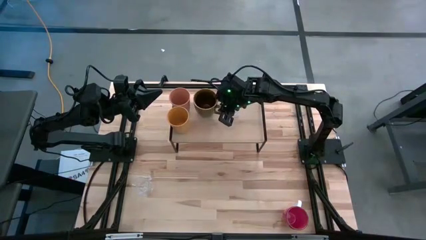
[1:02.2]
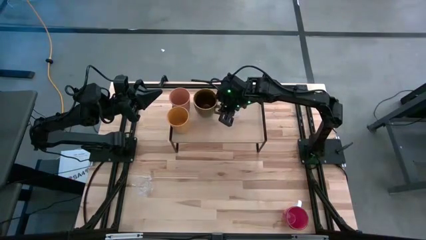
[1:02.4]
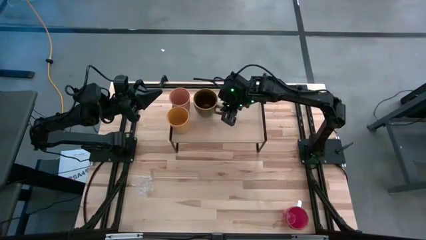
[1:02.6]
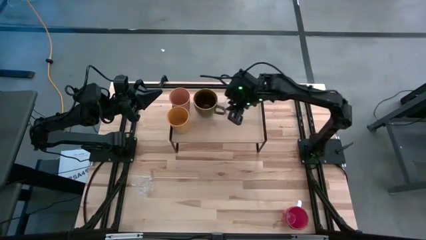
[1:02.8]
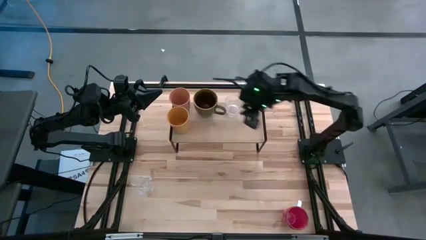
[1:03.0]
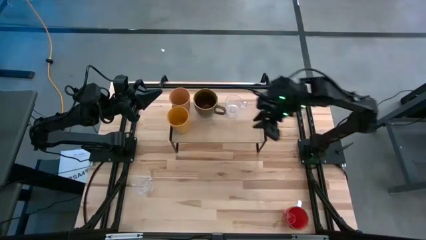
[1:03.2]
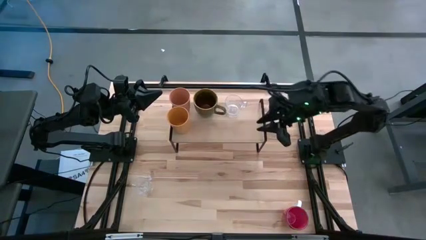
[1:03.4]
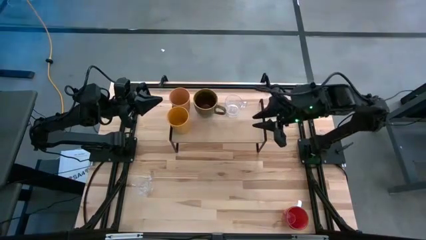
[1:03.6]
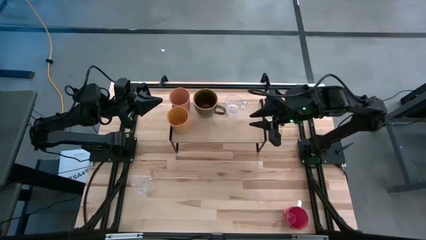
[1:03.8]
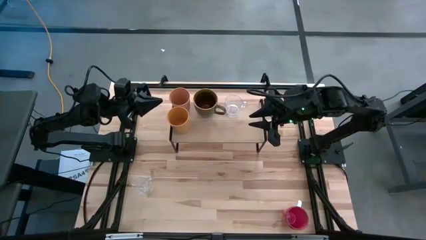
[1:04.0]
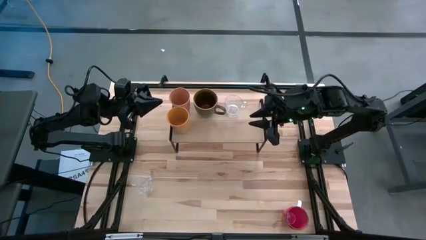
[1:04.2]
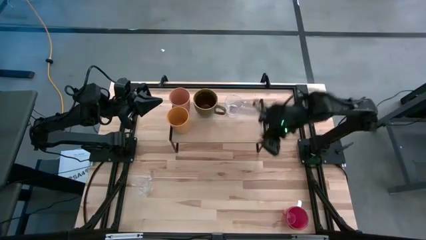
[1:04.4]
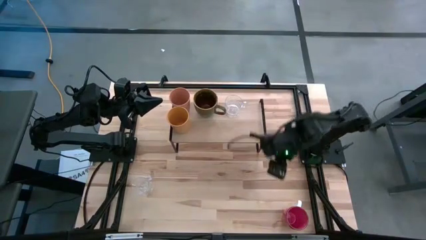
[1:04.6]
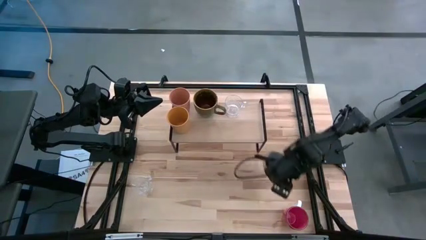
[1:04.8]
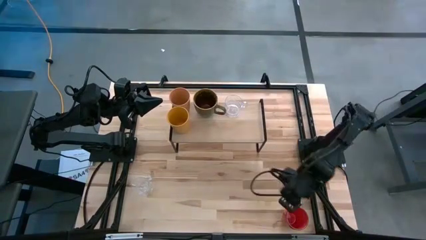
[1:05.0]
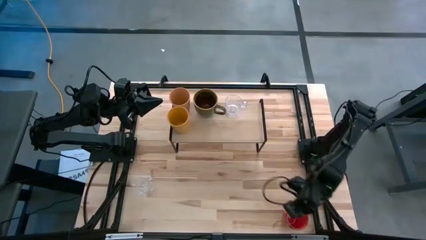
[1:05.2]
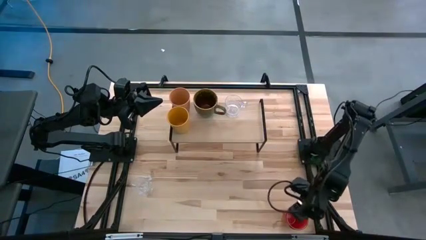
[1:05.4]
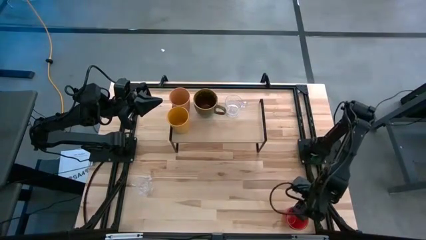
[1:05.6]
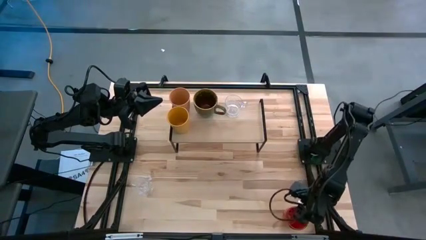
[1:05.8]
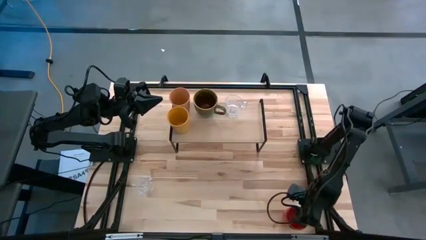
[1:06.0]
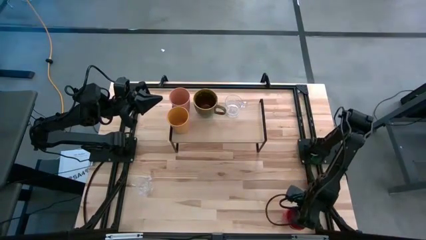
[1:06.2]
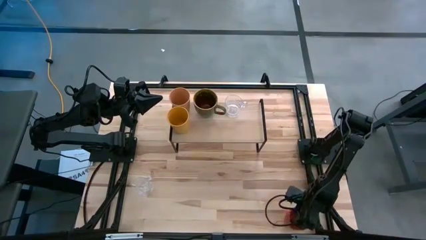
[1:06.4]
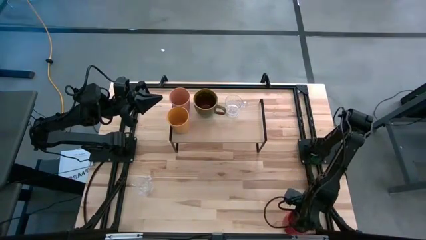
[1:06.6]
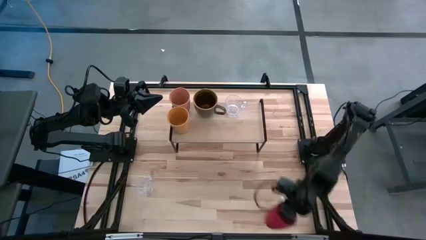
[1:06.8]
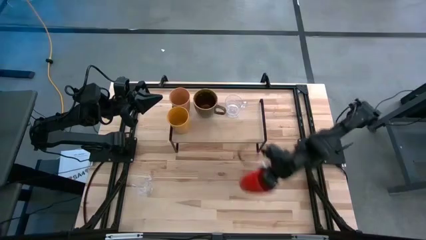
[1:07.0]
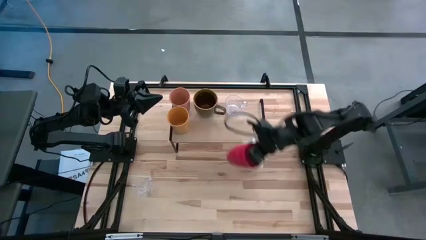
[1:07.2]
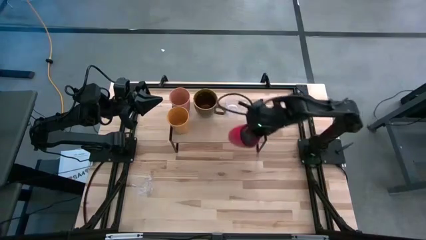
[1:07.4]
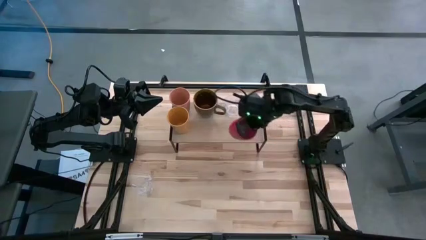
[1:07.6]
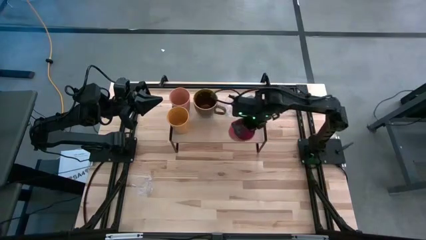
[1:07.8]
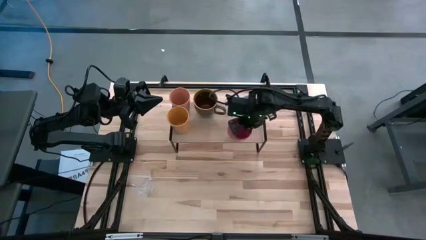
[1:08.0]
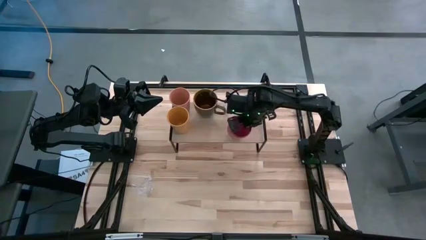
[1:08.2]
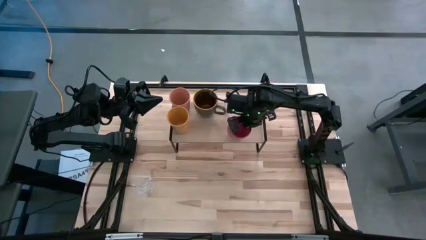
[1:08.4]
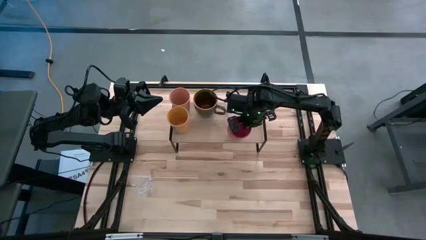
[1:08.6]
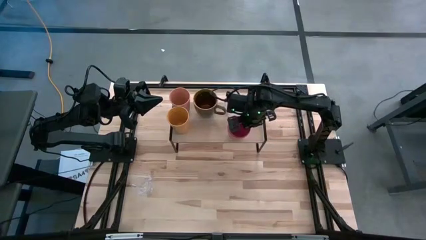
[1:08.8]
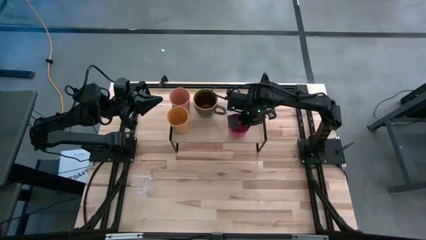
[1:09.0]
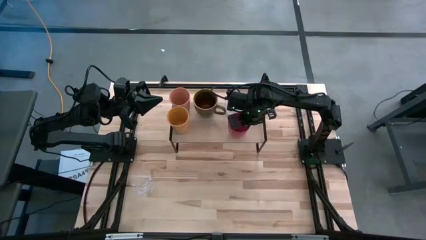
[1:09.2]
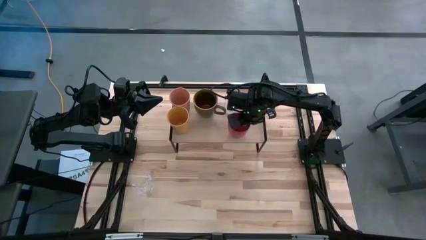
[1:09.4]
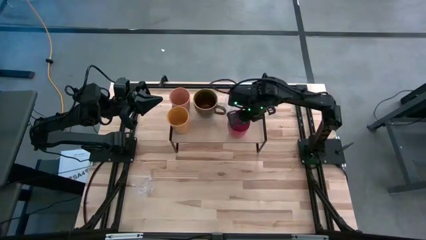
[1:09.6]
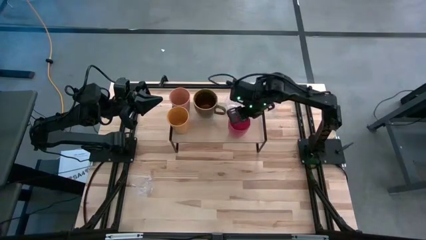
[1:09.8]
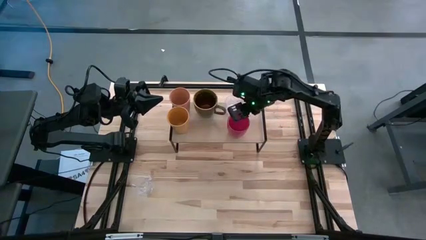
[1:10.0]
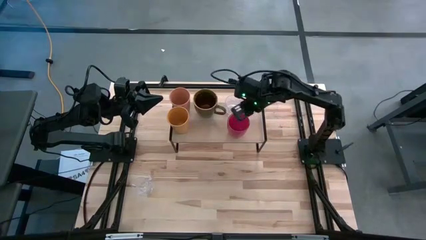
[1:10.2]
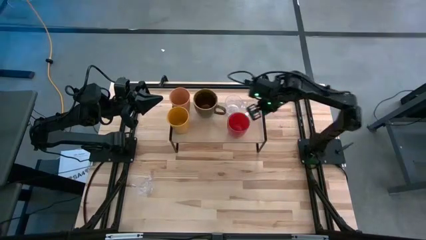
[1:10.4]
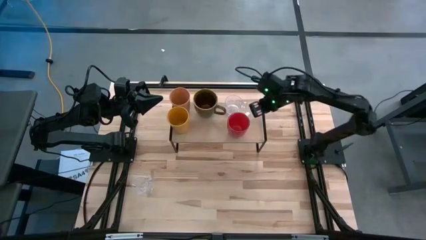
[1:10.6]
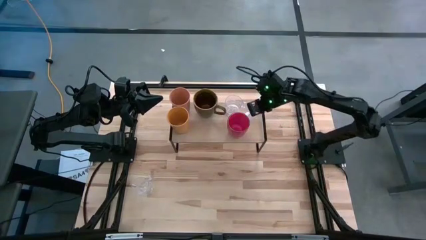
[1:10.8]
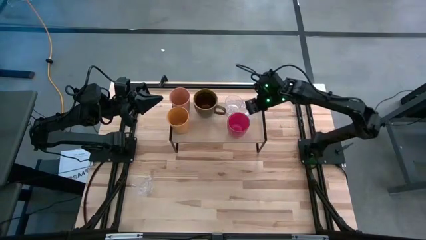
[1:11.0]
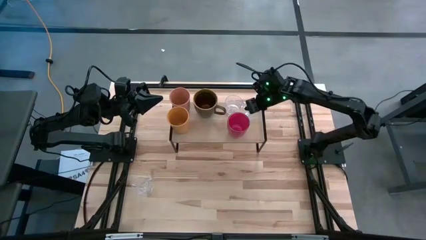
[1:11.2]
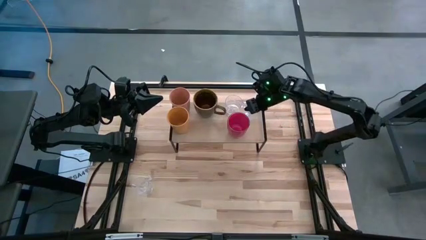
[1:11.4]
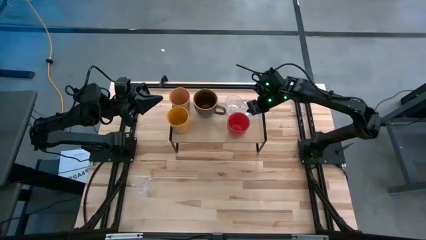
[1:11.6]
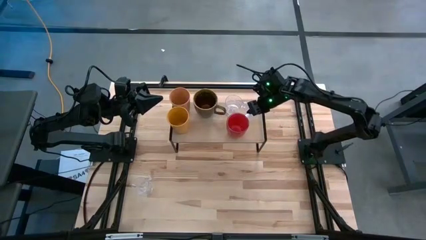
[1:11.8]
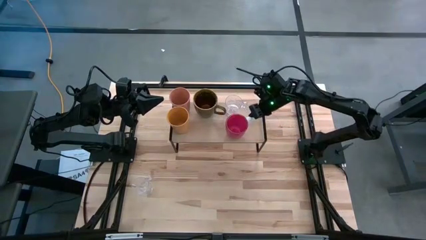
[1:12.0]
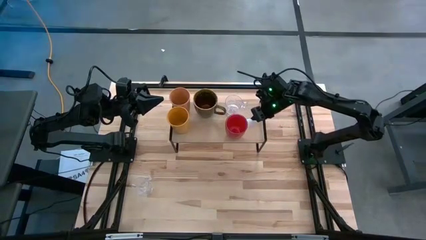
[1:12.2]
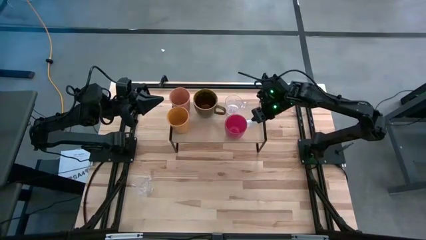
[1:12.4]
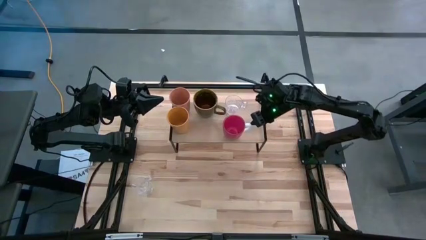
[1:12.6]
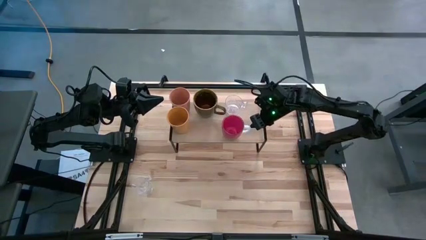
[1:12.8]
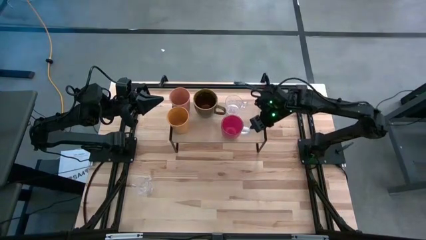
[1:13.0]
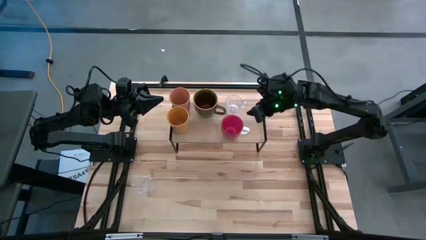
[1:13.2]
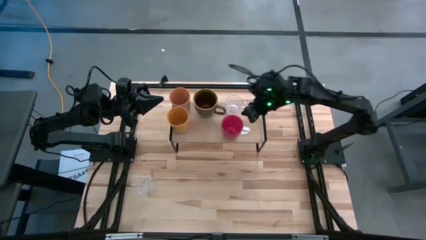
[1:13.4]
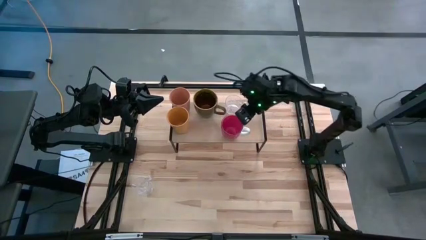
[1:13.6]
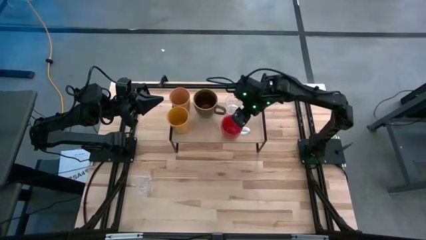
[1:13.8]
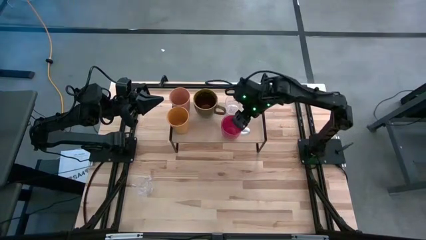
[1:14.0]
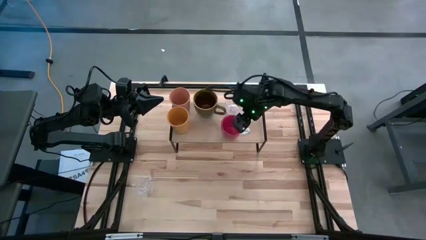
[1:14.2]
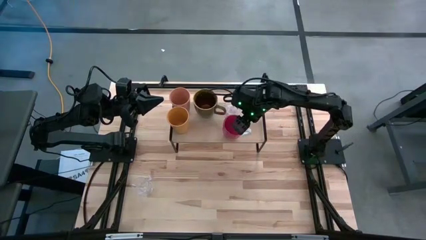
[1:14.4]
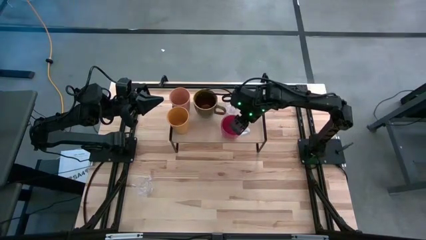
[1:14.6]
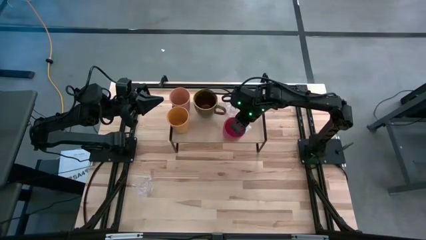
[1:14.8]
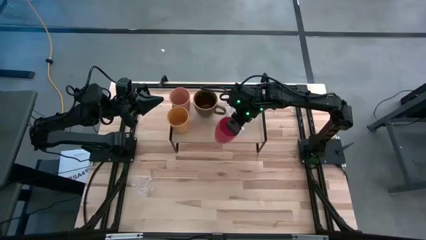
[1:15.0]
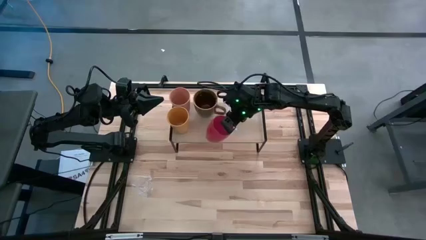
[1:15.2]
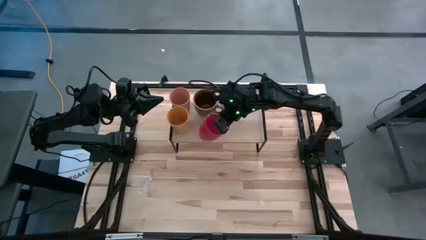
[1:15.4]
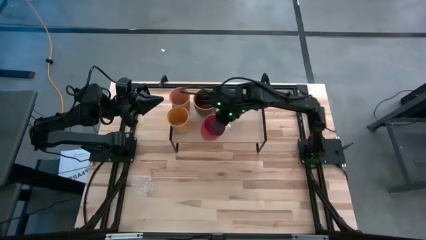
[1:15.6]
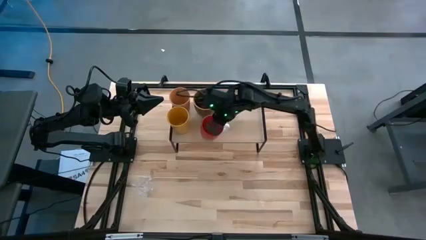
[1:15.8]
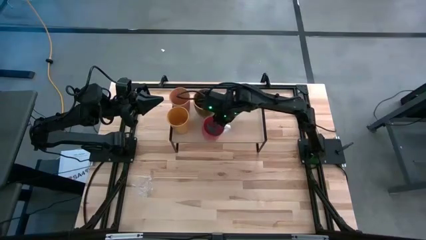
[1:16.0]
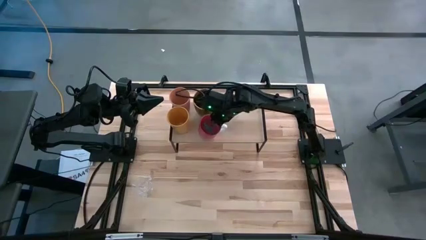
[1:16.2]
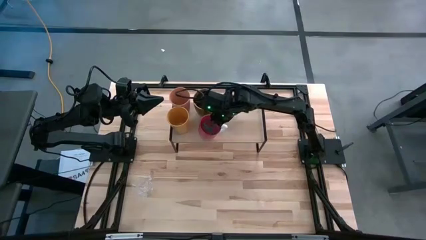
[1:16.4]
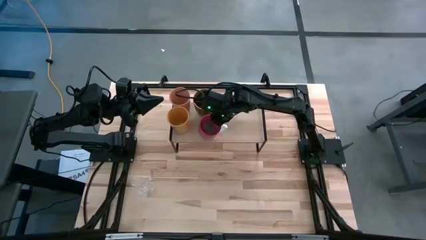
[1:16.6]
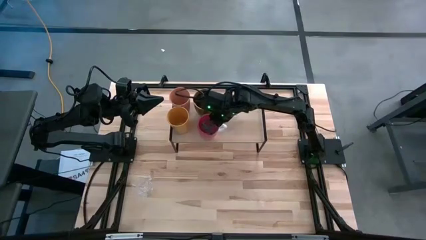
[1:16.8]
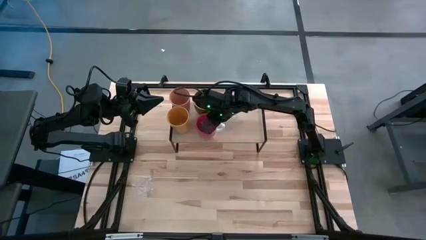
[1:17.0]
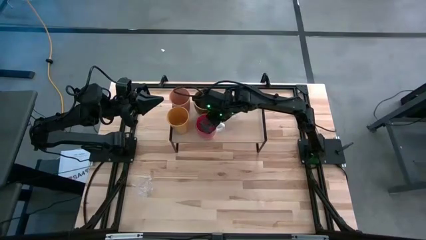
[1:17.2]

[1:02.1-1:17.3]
Task: Stack small to large cups/mugs on shelf
Put the red mug on the shelf

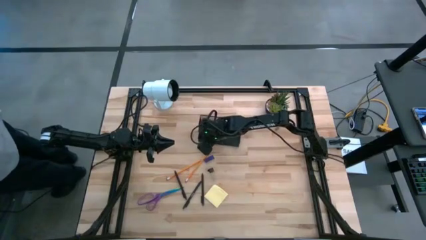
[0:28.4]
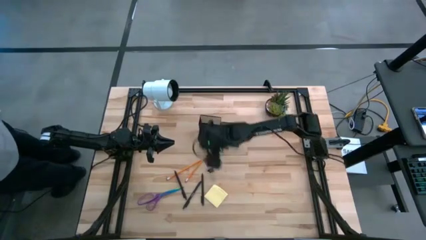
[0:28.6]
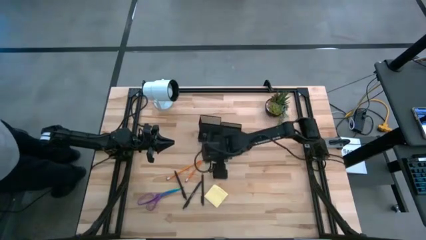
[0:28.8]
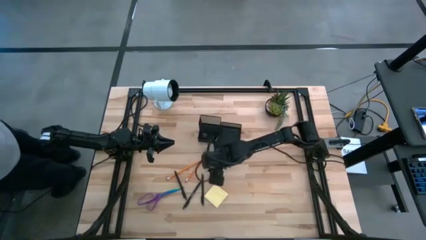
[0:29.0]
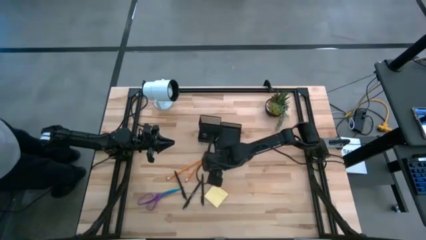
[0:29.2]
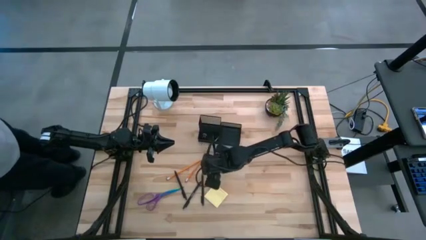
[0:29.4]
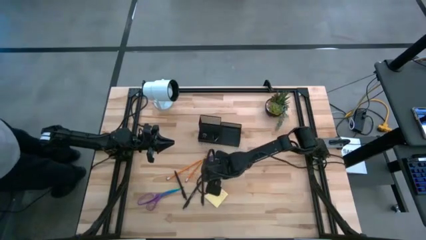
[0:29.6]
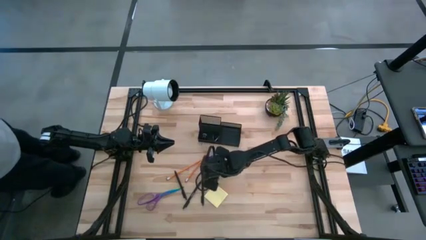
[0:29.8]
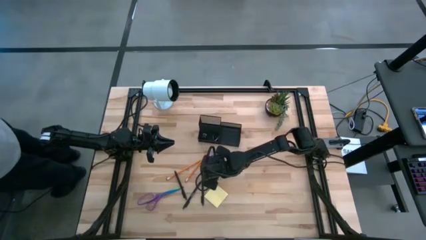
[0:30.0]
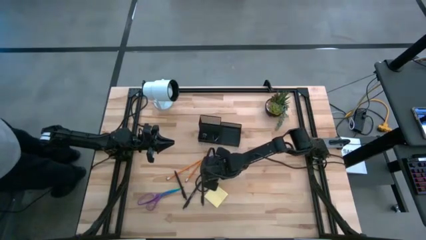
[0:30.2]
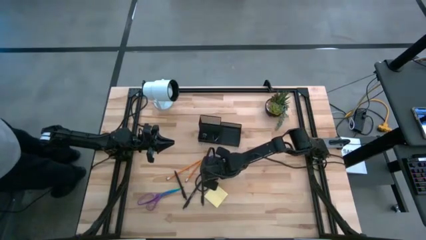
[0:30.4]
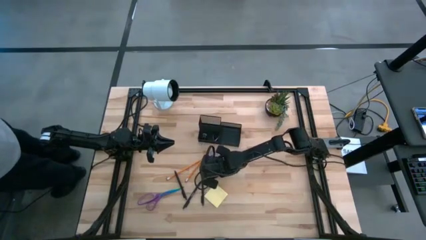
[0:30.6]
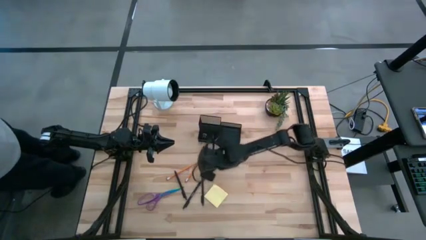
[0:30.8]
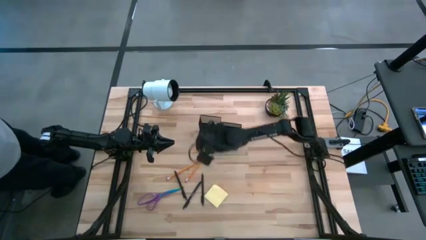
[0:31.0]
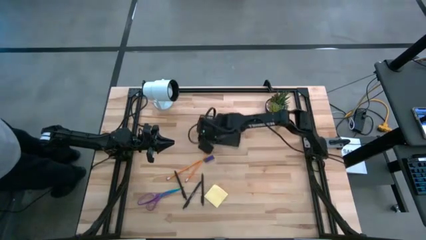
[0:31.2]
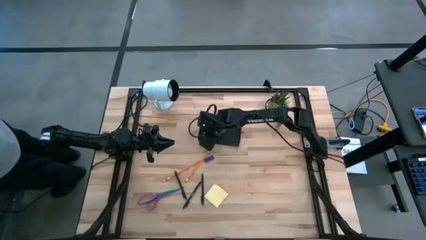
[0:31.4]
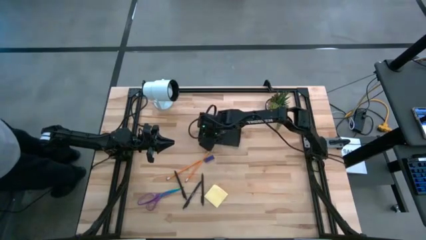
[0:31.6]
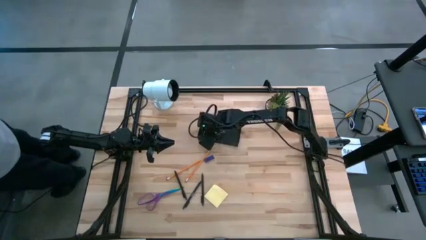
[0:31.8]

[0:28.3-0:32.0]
Task: Pick and place office supplies into organizer
Put the black binder clip into the black desk organizer
